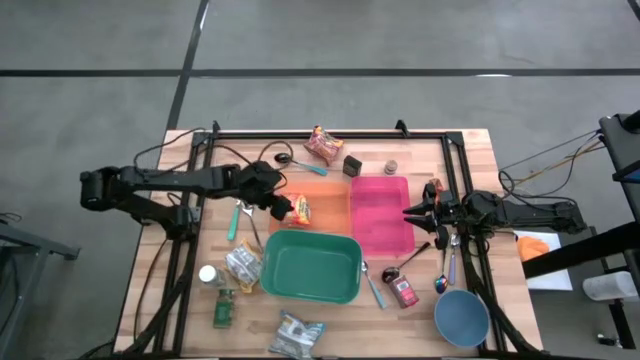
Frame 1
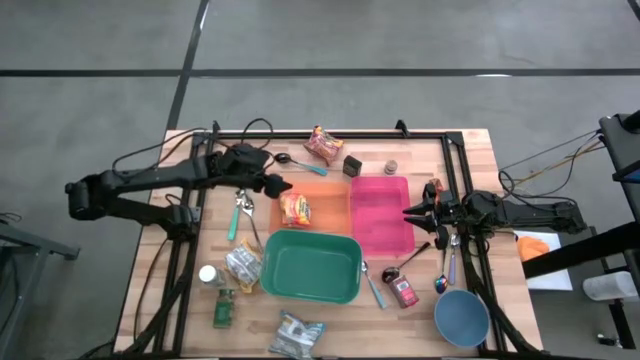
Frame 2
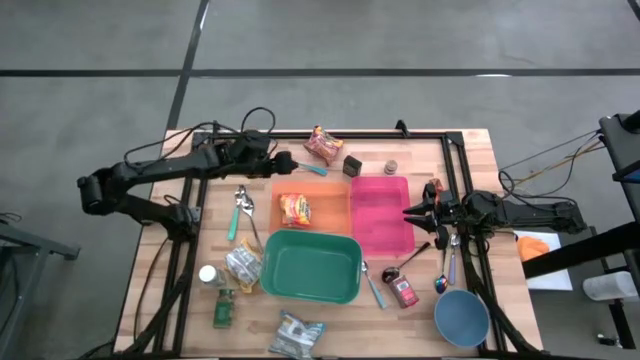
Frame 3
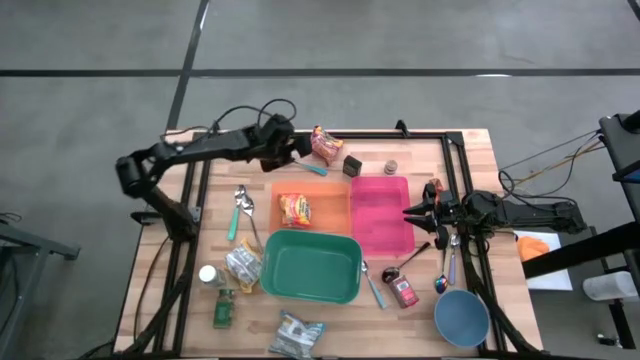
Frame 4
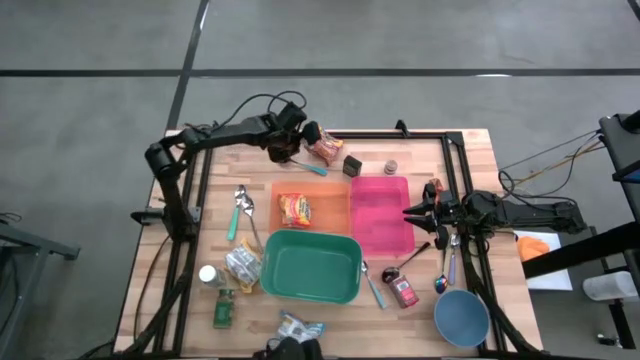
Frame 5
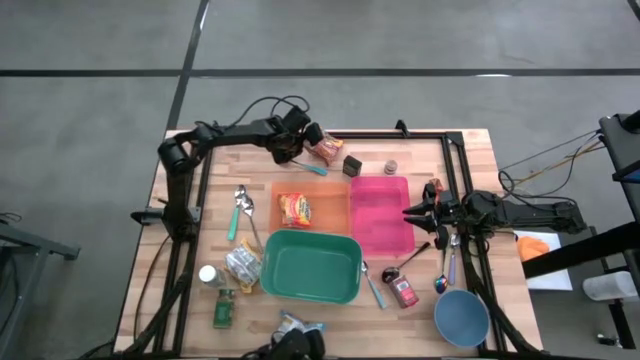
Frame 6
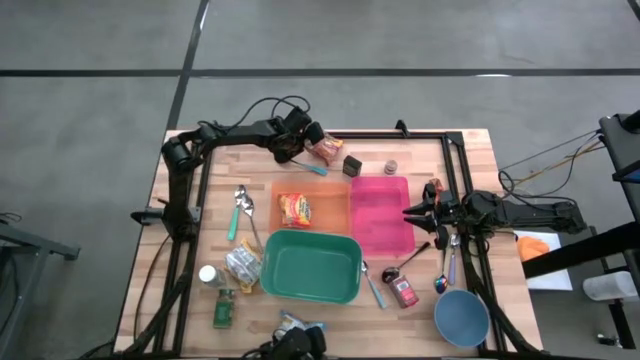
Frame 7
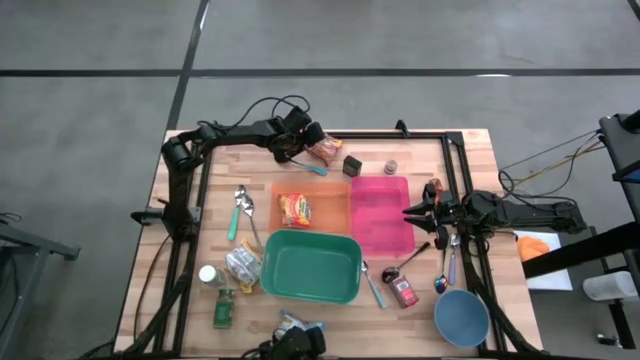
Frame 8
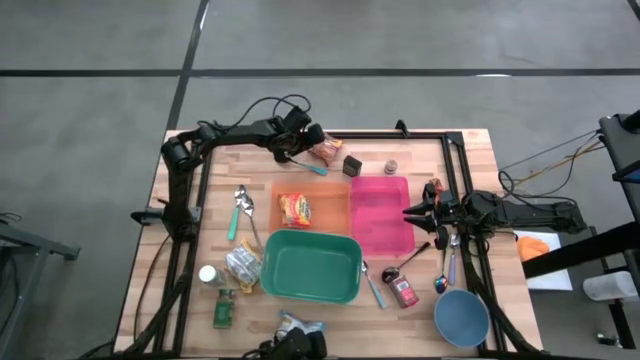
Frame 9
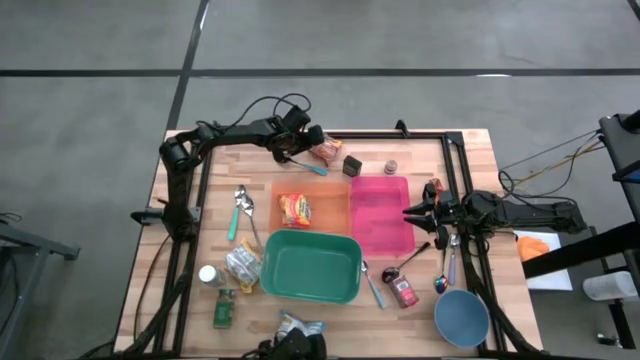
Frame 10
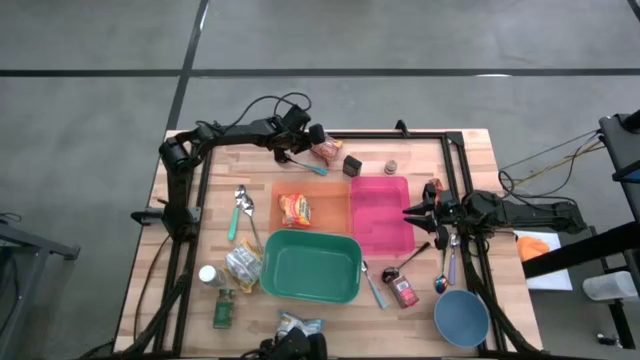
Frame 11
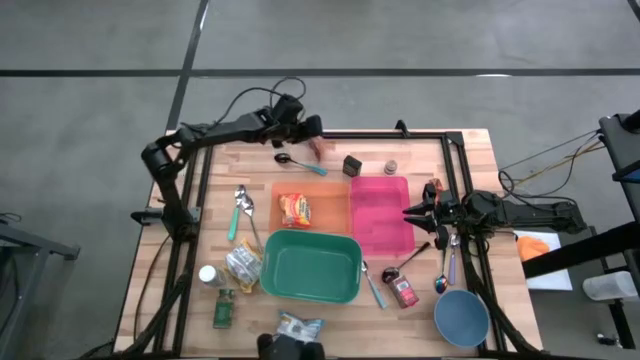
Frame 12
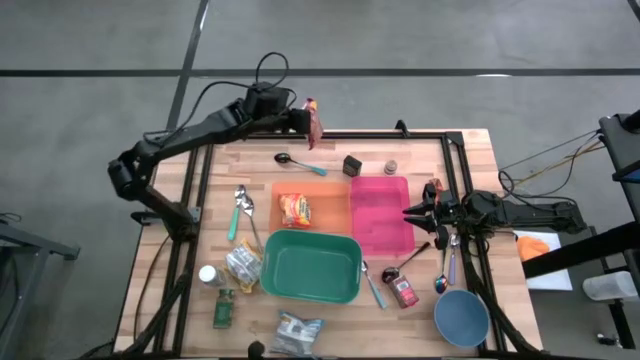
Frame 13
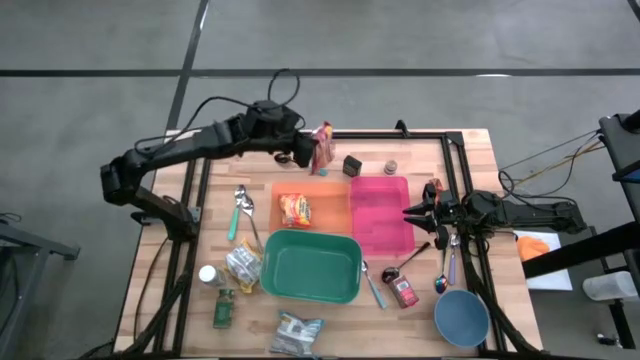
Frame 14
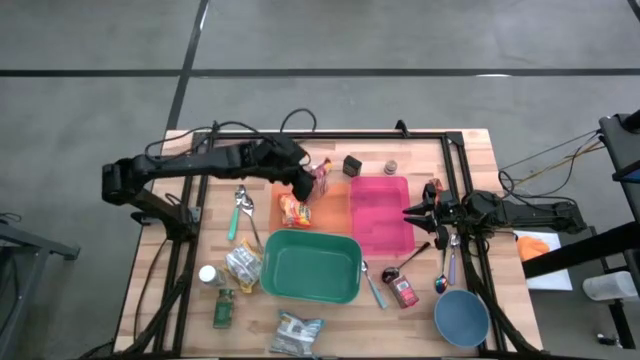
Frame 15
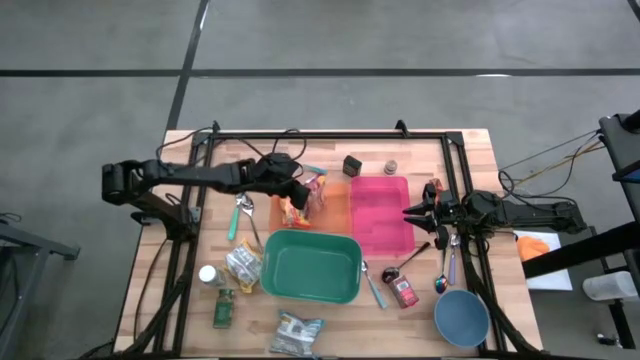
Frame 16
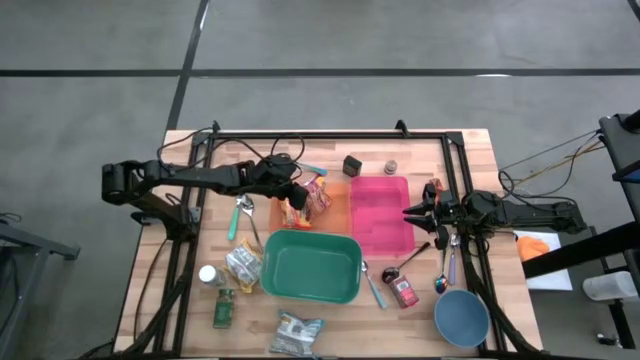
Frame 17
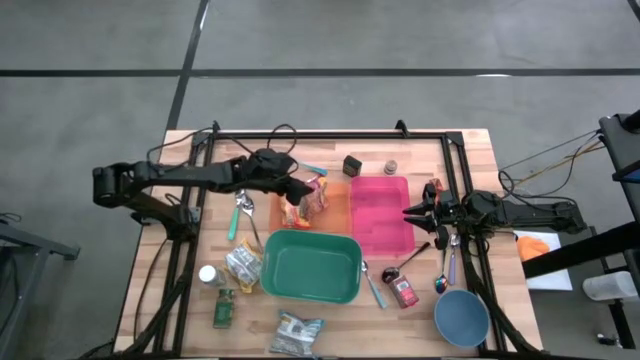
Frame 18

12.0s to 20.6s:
Put the red noodle pack into the orange bin

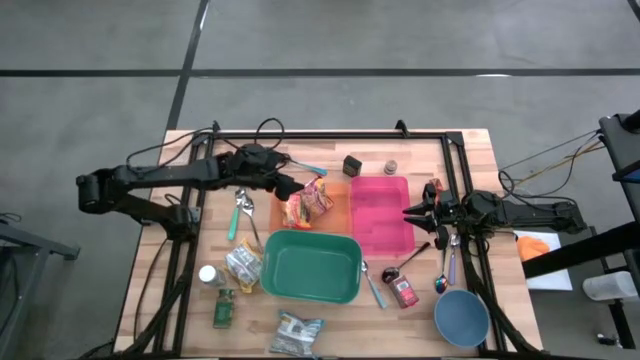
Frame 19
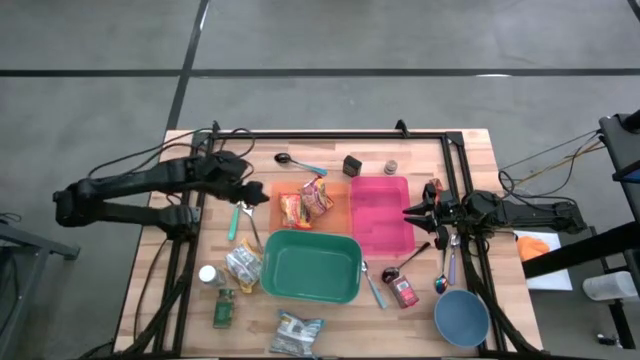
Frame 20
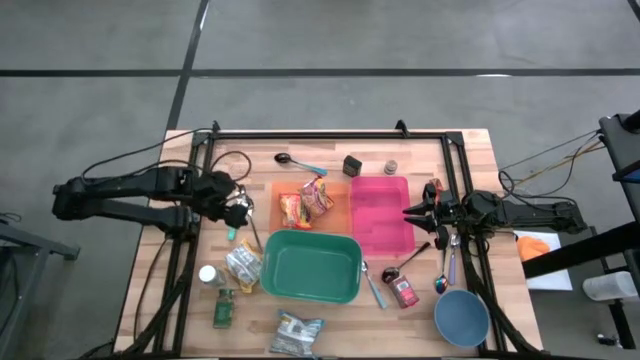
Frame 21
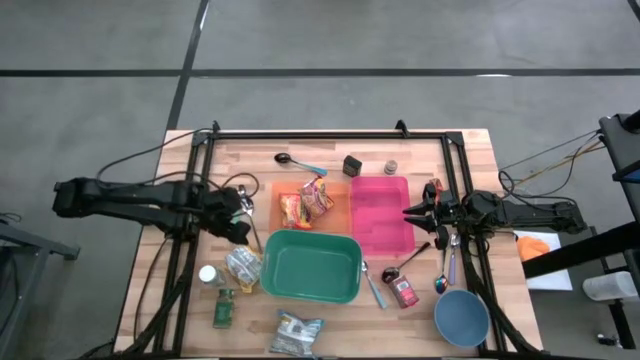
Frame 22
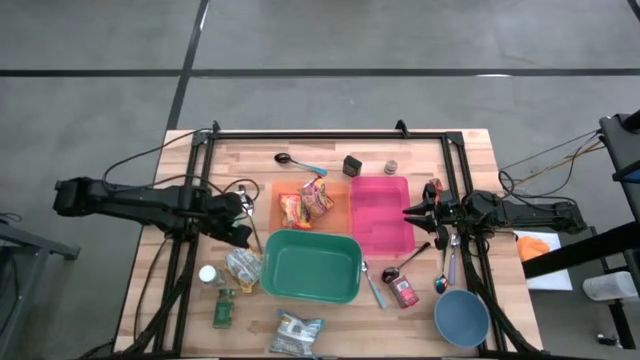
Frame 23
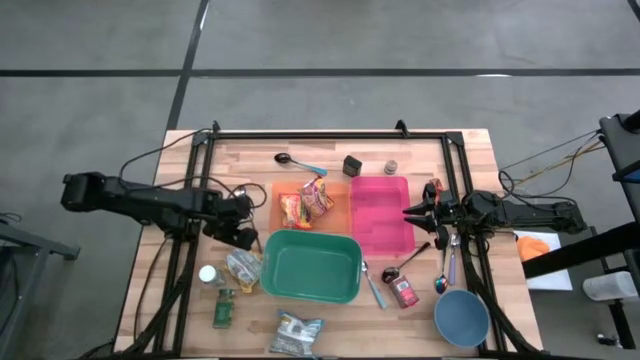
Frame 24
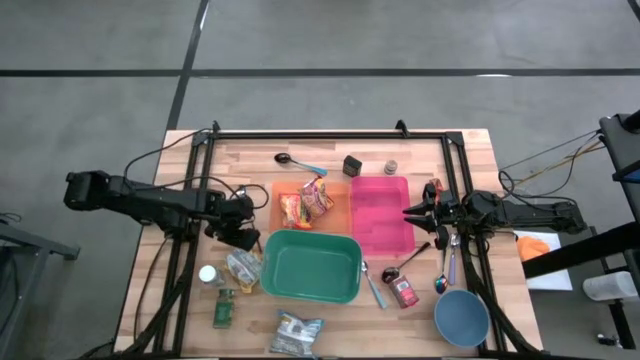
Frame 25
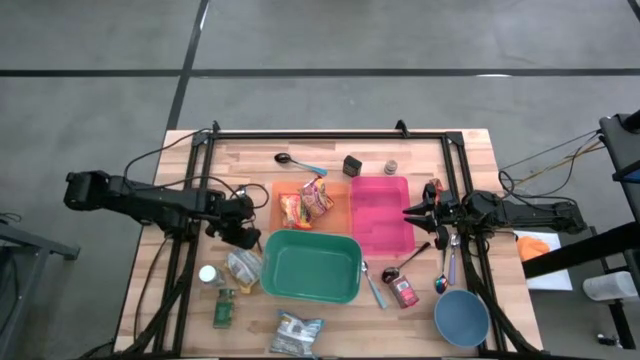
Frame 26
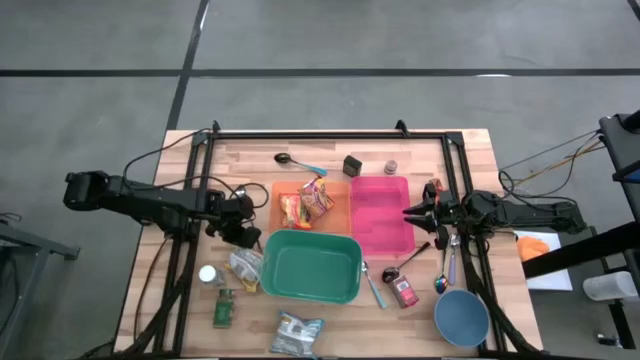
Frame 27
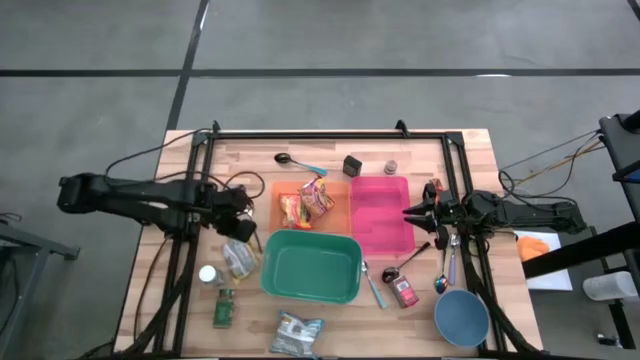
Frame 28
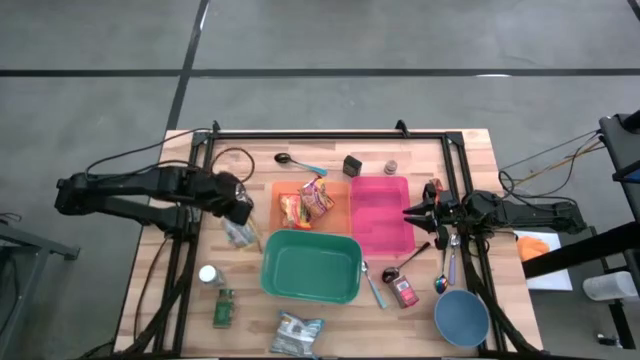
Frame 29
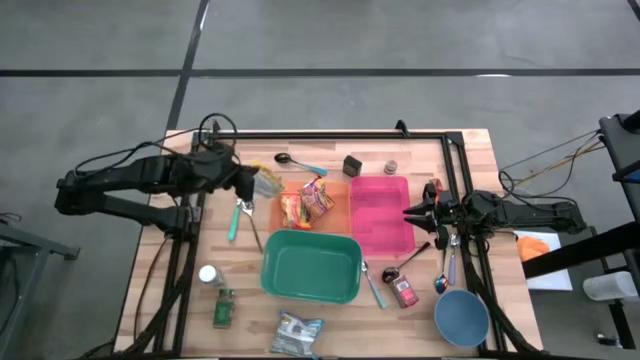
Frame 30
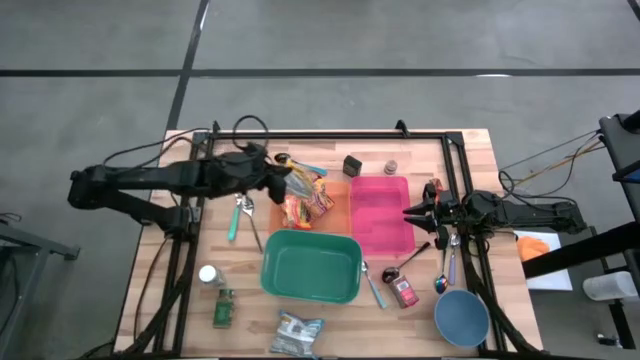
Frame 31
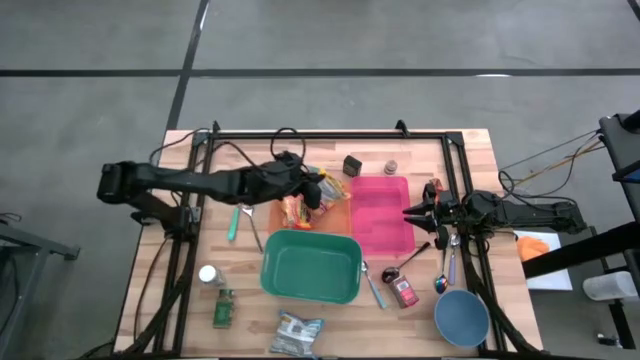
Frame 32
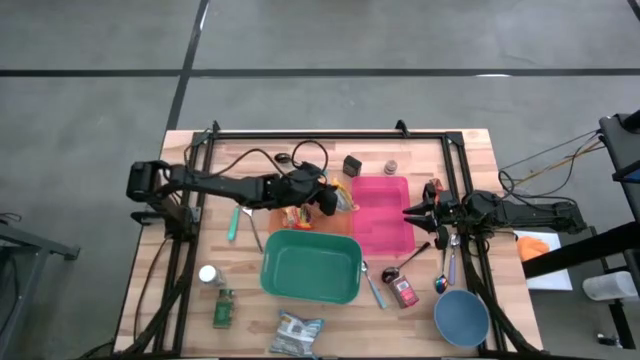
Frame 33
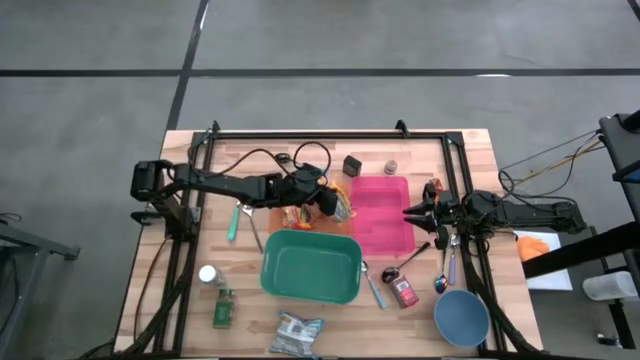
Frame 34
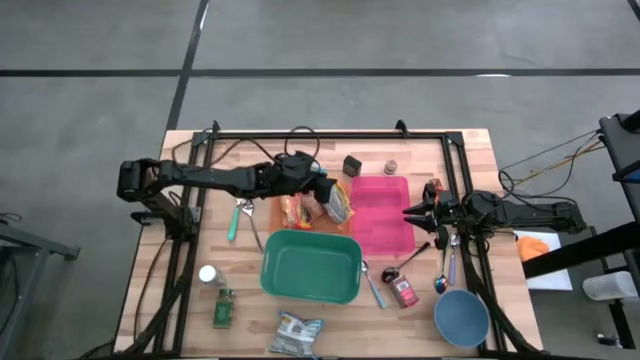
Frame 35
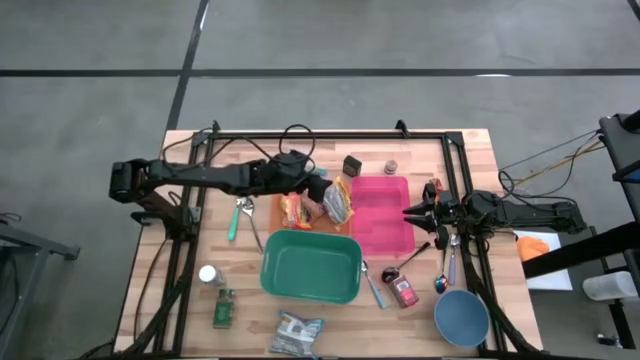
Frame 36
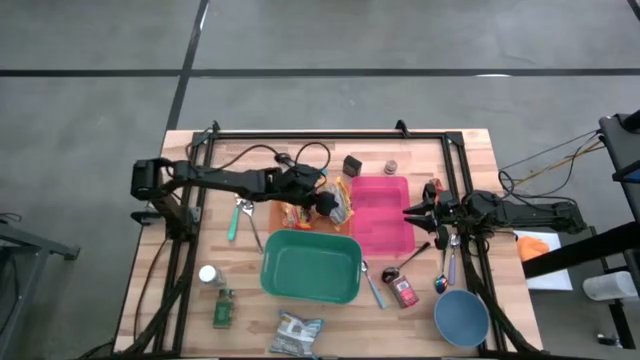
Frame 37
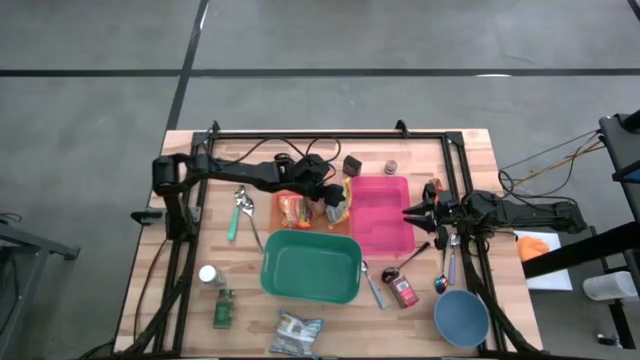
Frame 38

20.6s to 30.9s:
Put the yellow noodle pack into the orange bin
